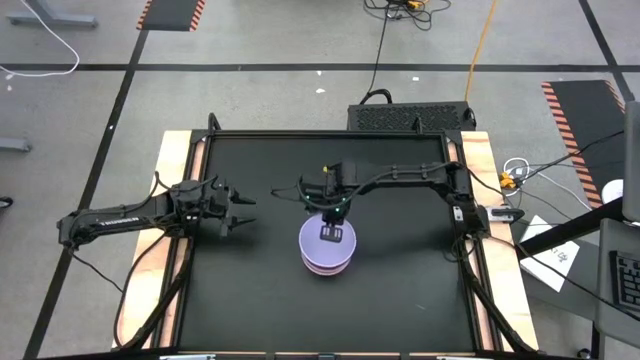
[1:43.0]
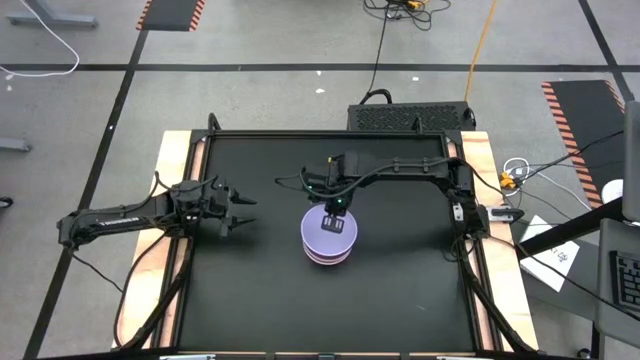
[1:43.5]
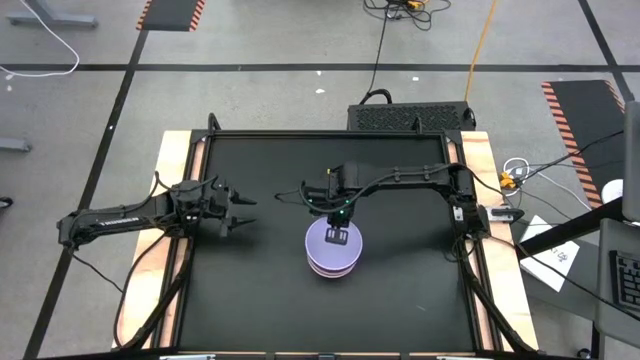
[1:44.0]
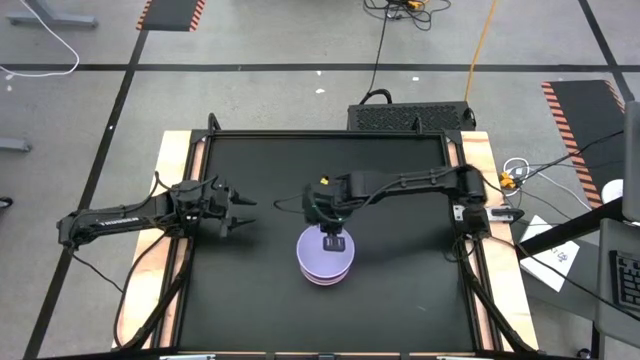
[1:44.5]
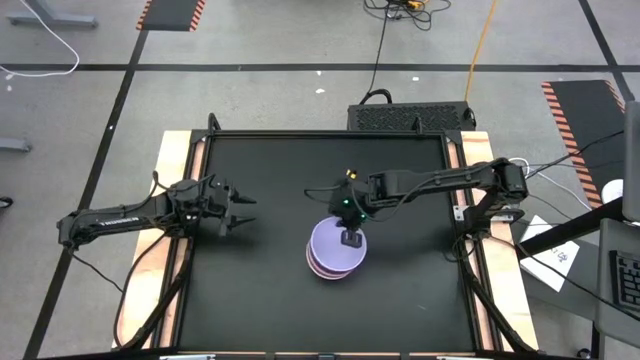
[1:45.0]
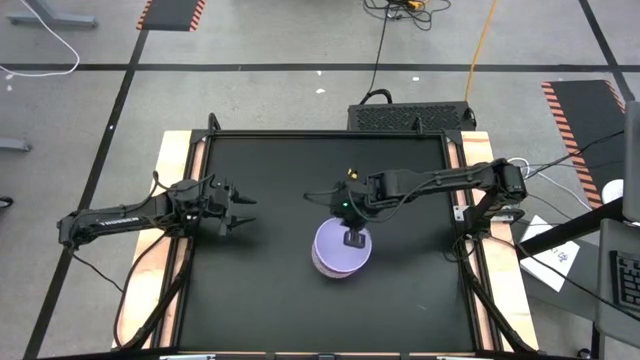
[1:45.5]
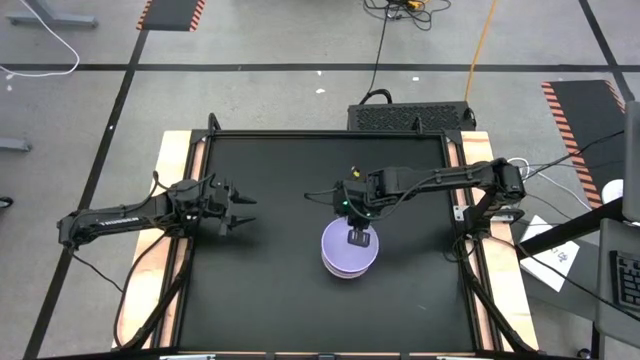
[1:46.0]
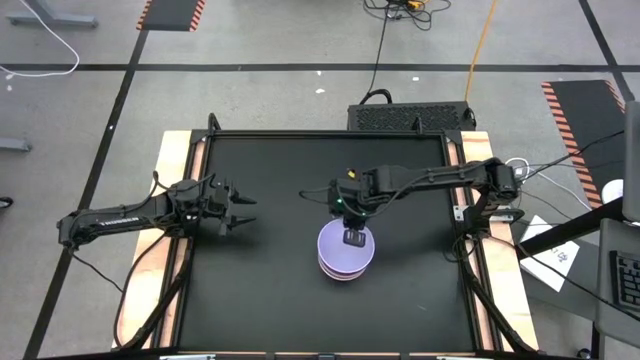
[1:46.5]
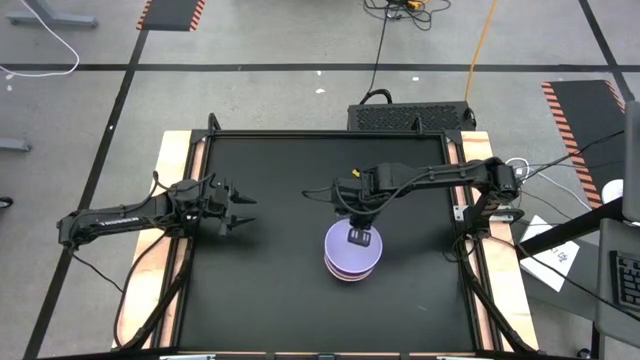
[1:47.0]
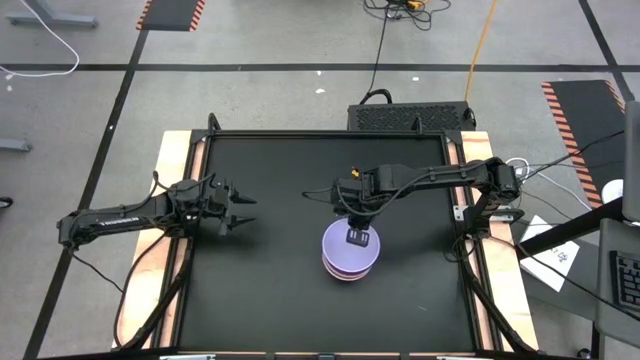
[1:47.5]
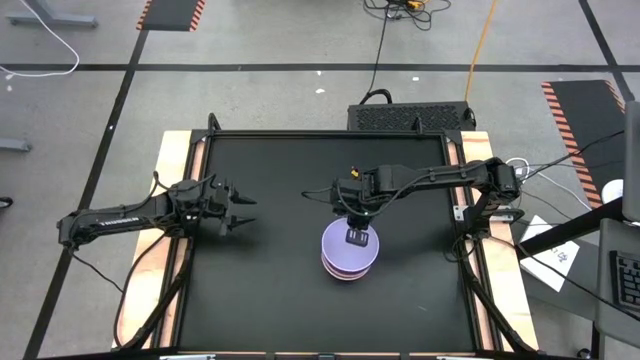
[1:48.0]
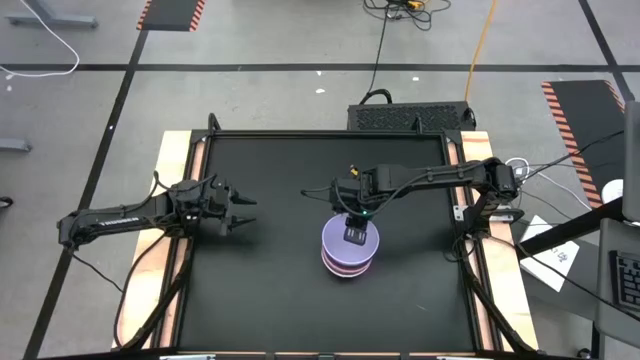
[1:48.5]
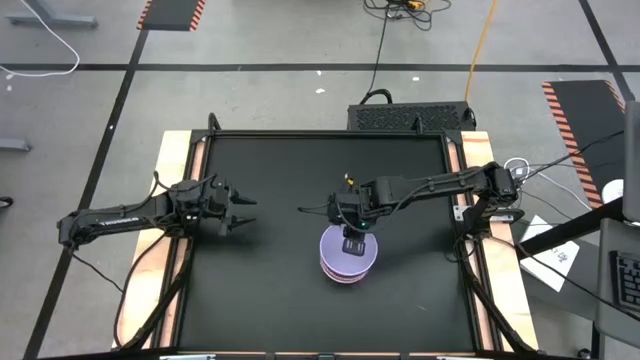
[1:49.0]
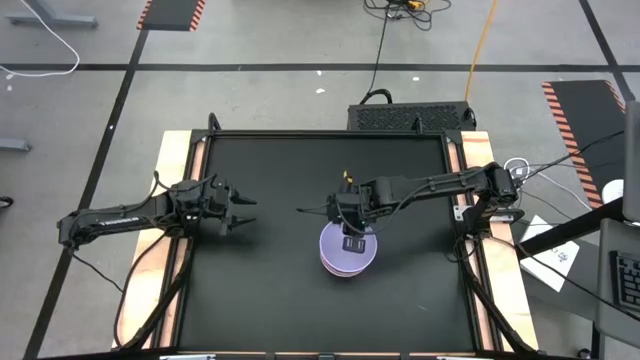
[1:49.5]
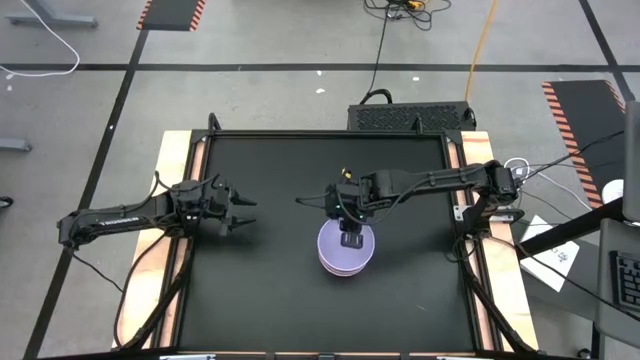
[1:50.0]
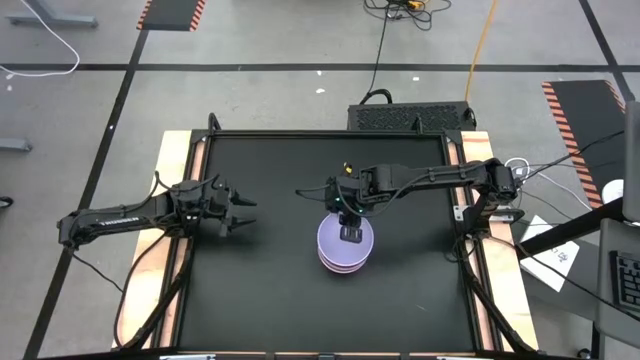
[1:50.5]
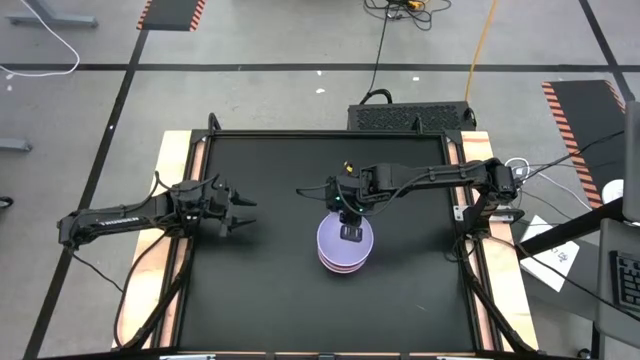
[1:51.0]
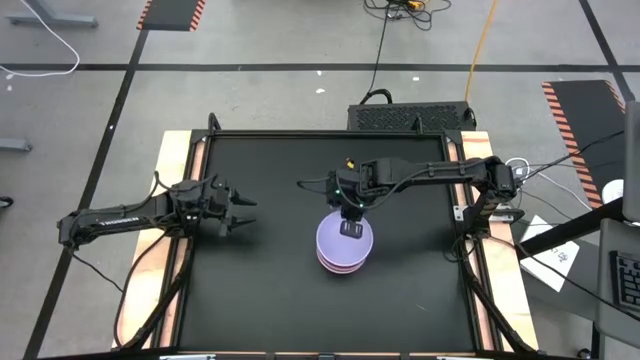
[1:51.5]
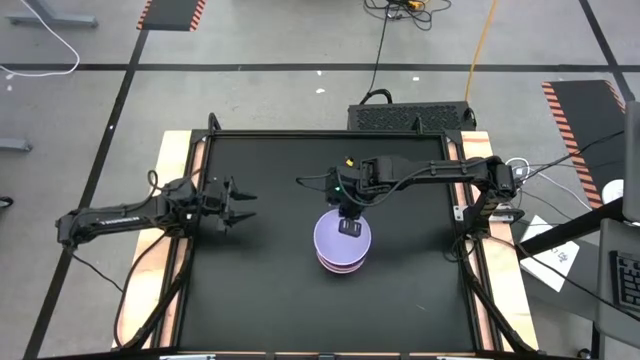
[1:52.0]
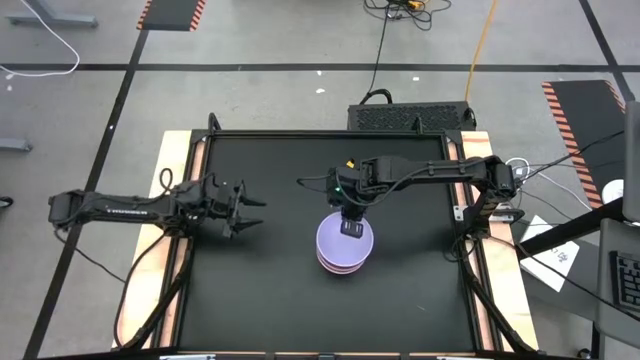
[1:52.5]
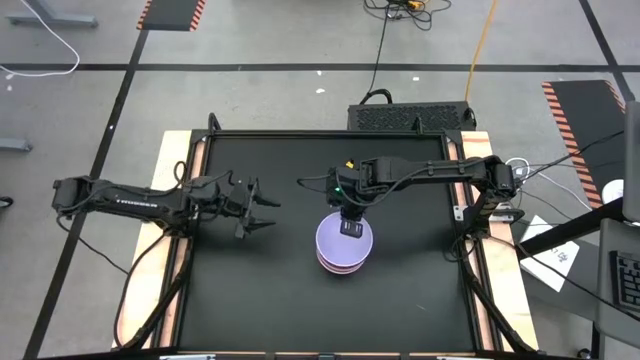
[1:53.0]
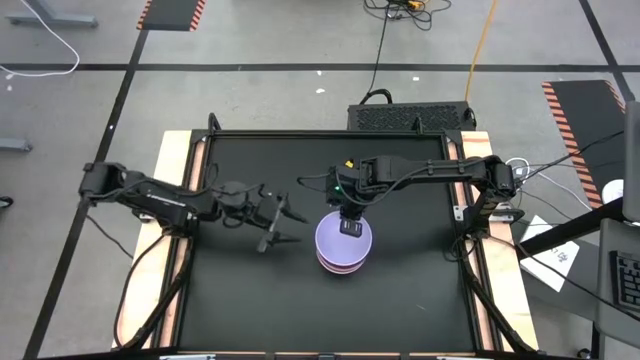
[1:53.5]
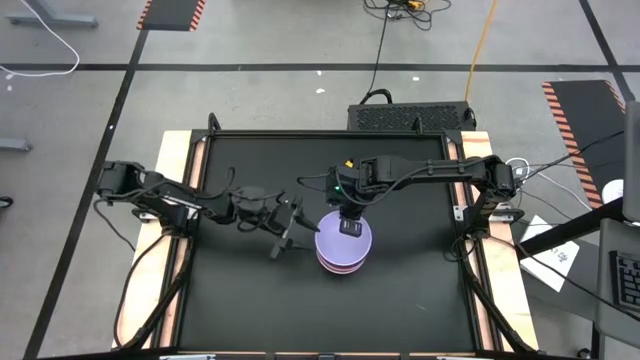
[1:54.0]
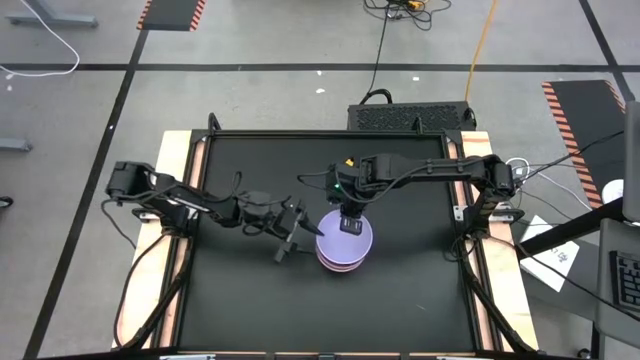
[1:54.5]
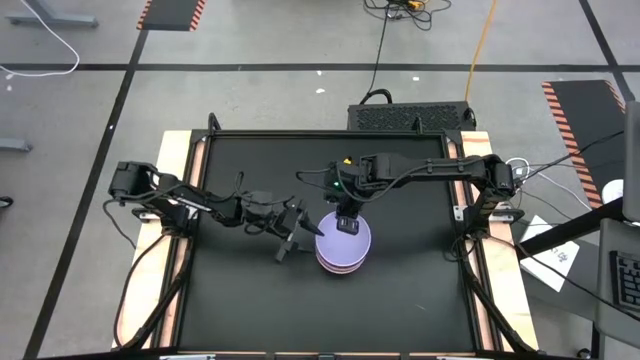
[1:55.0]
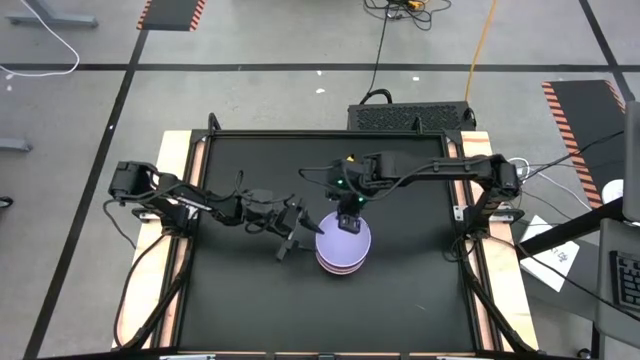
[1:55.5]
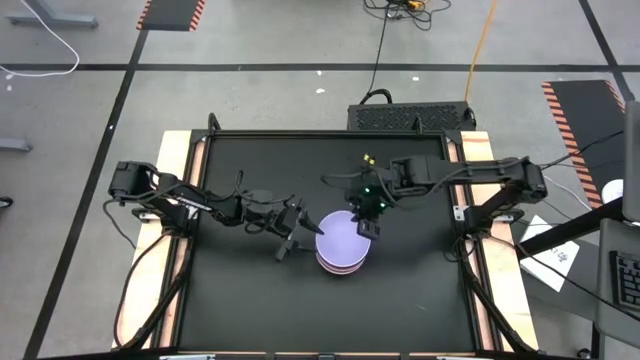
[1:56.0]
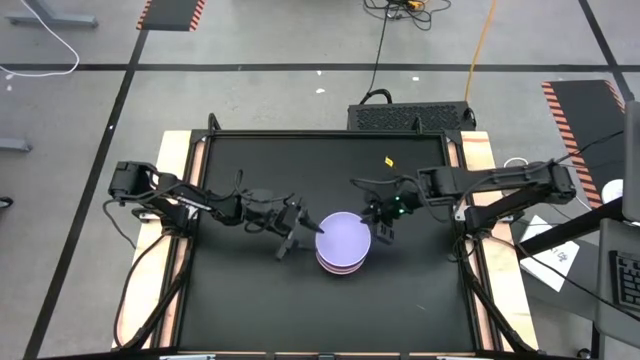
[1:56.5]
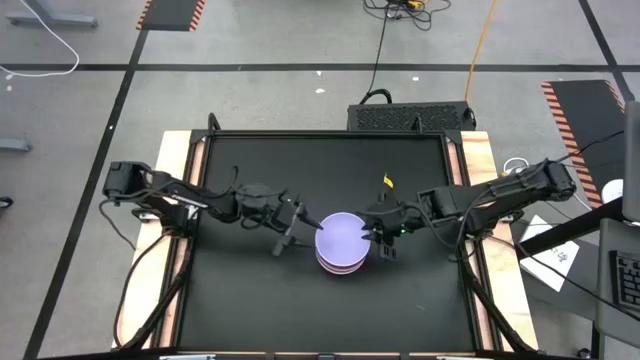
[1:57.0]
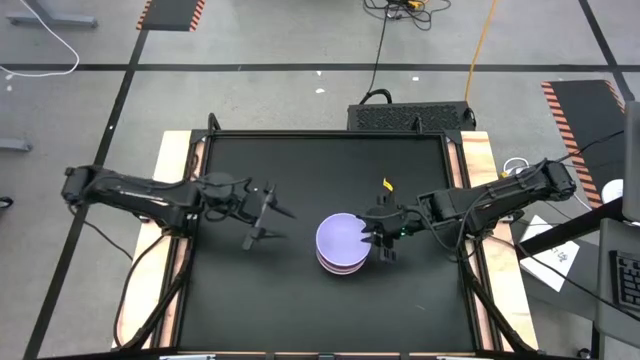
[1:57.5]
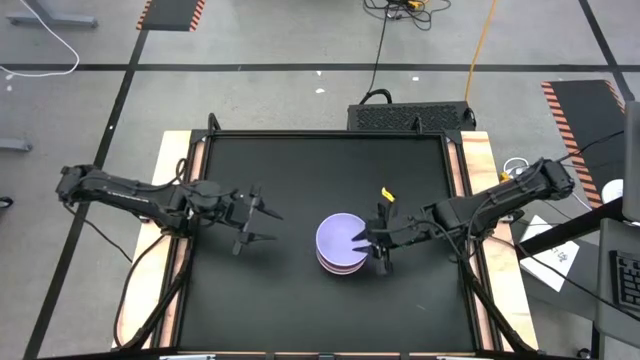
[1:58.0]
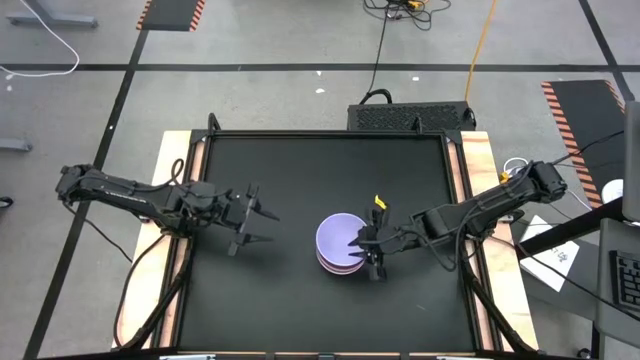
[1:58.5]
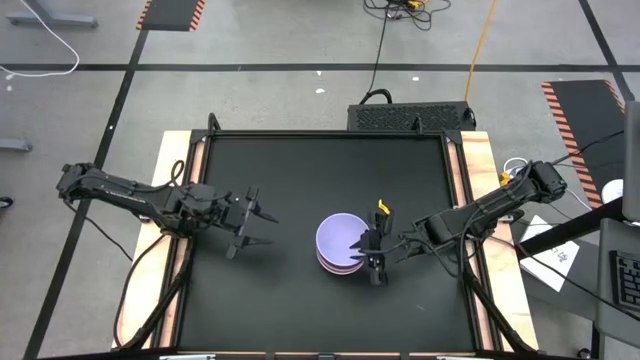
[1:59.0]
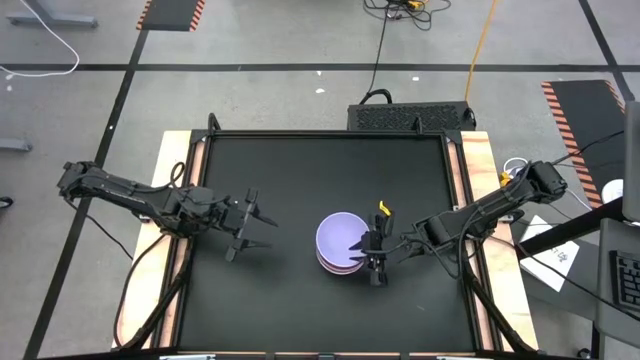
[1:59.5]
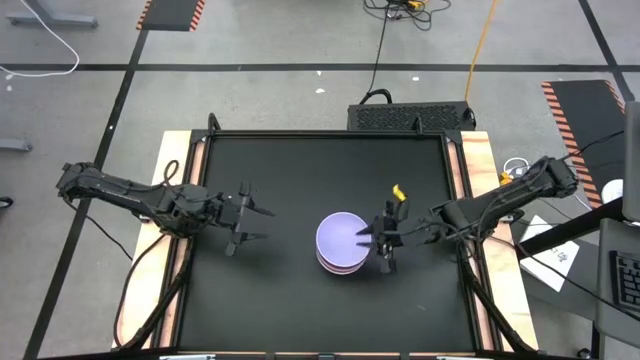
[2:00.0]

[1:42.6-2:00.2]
Task: Nest bowls inside each other
Stack the purple bowl on top of the black bowl

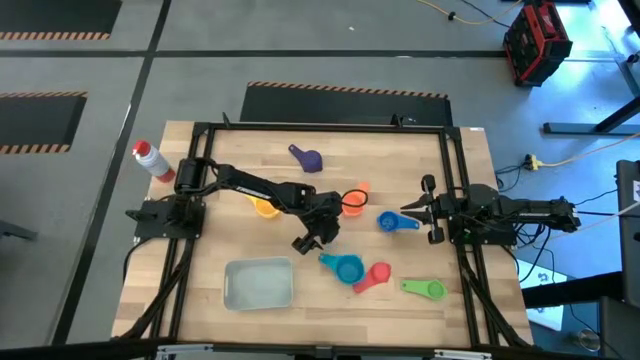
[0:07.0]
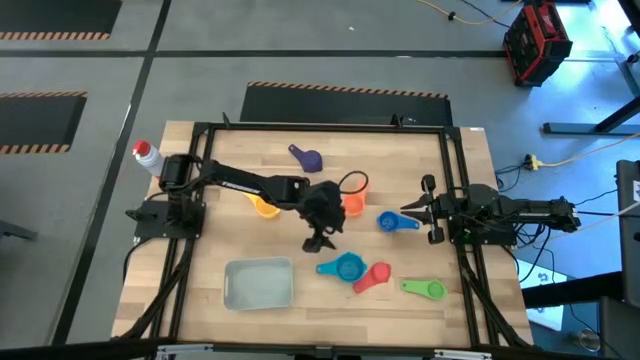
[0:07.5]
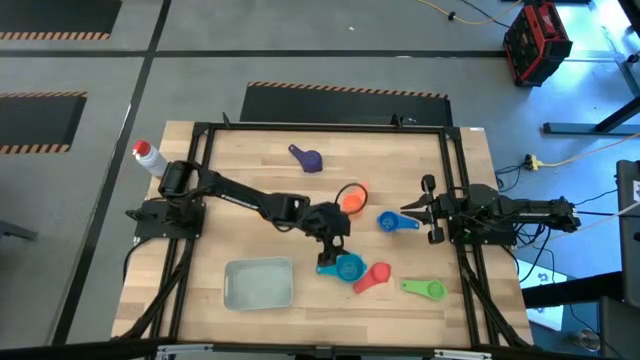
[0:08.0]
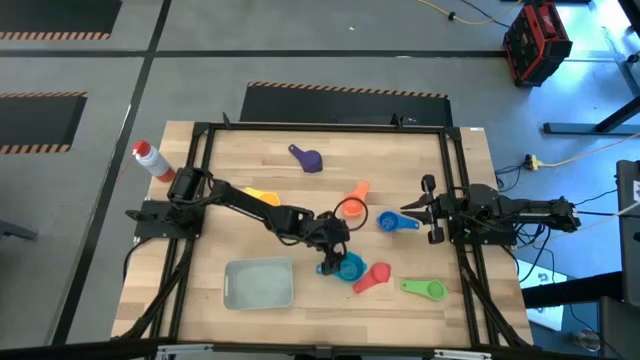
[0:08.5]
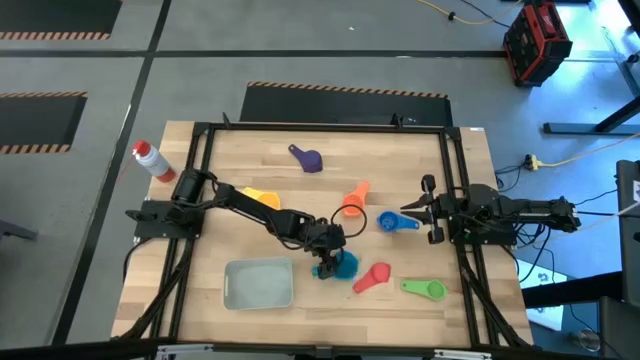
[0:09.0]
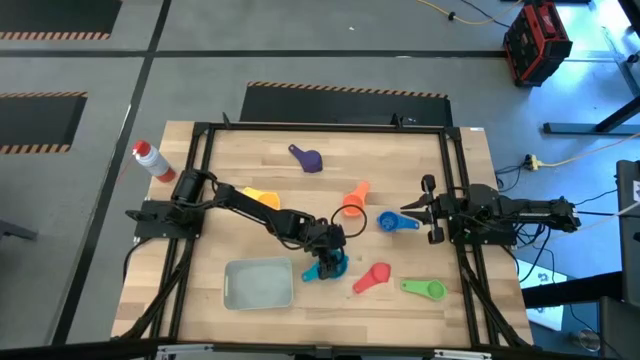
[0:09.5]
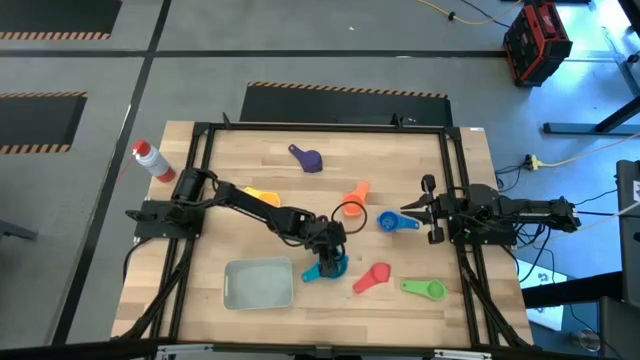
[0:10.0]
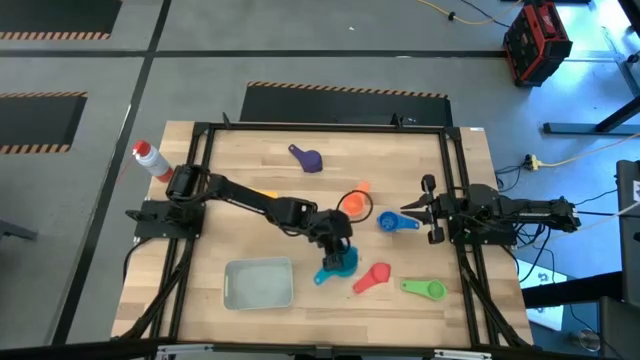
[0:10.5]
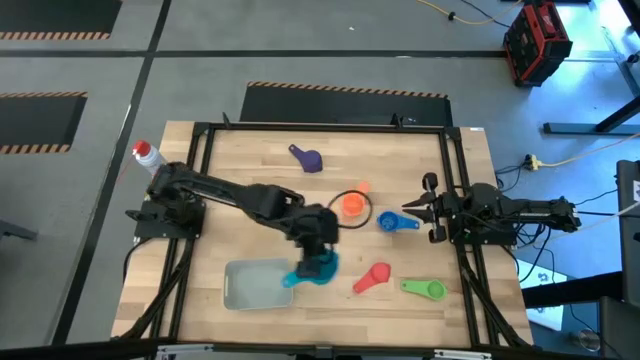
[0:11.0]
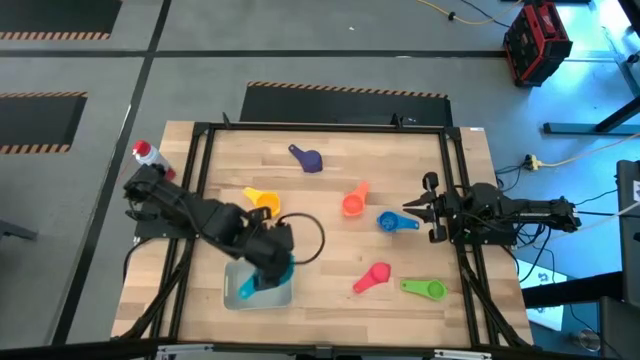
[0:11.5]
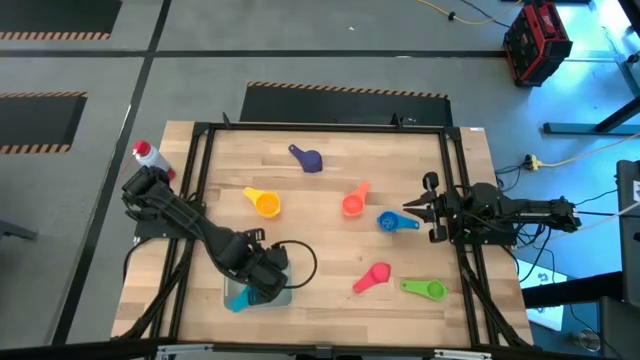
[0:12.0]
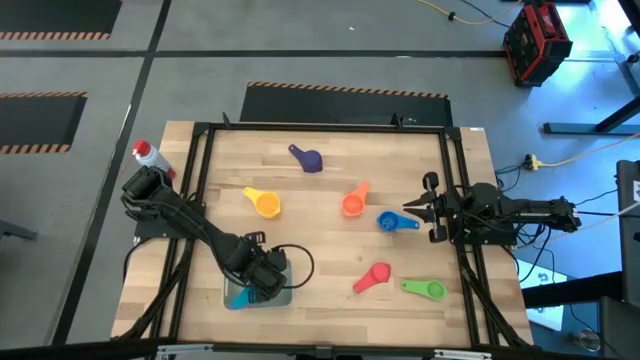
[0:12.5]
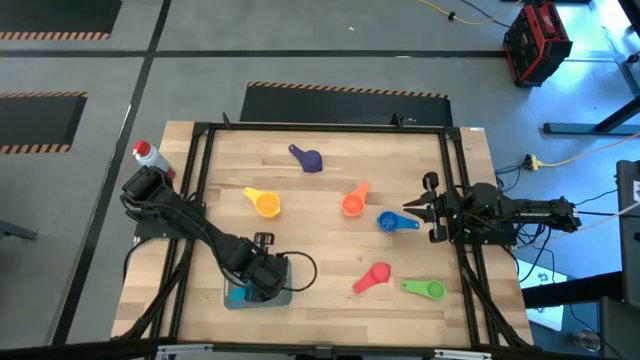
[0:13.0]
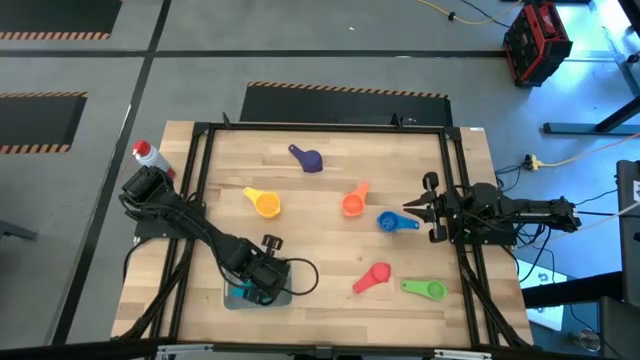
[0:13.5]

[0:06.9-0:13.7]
Task: Nest measuring cups in basket
Put the light blue measuring cup into the gray bin
